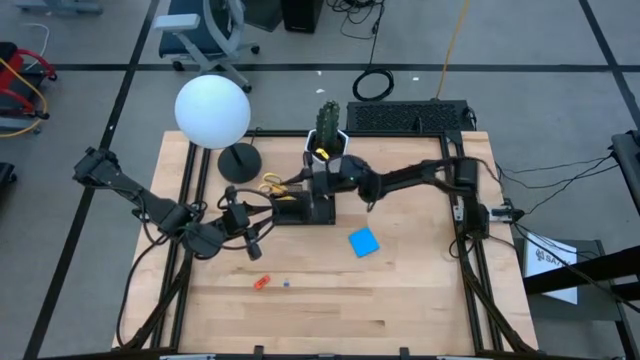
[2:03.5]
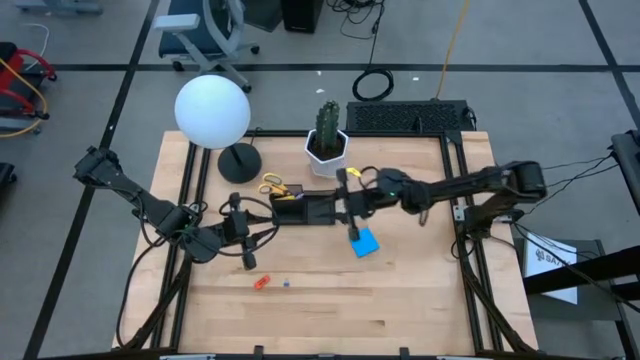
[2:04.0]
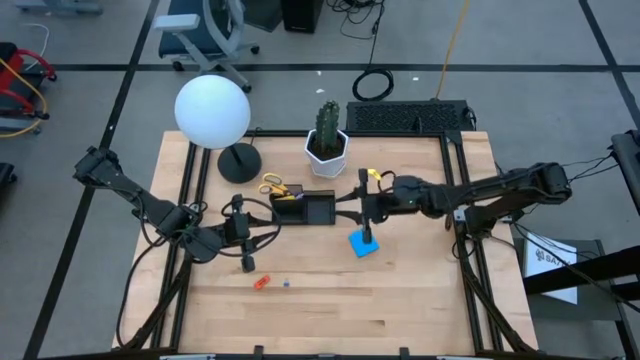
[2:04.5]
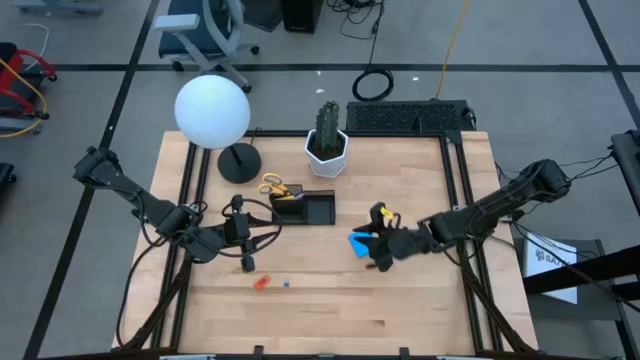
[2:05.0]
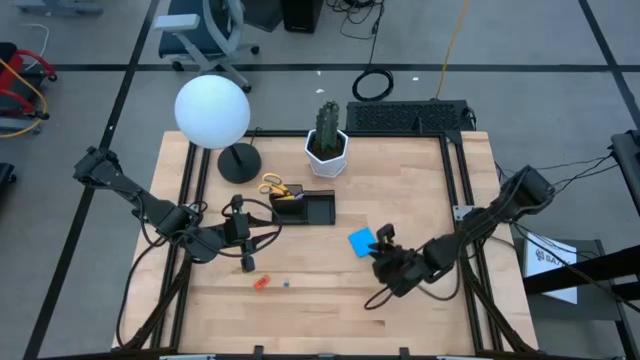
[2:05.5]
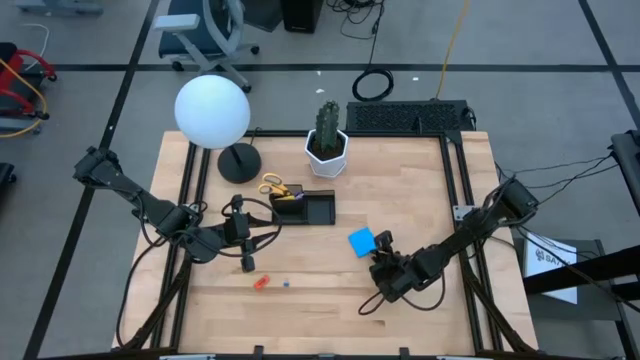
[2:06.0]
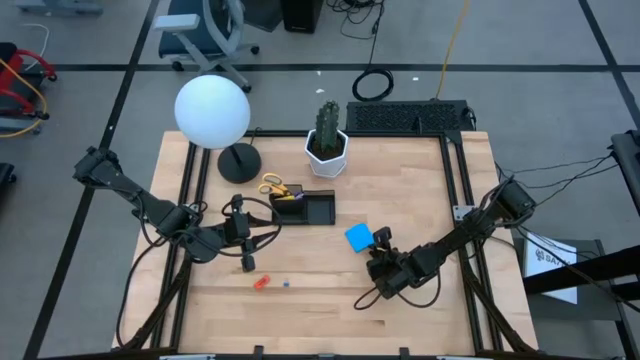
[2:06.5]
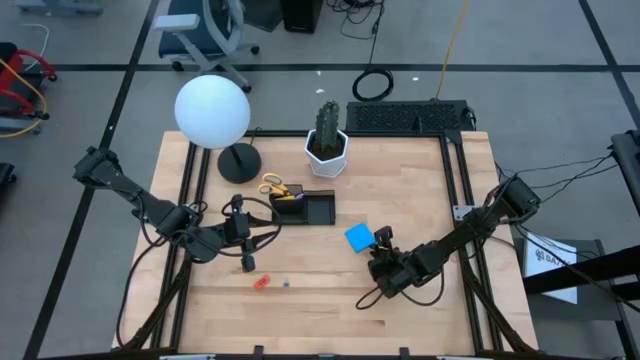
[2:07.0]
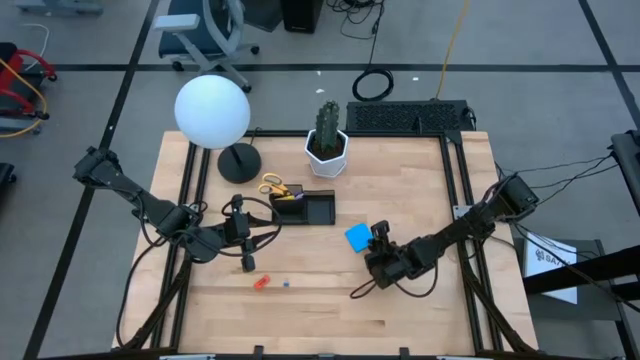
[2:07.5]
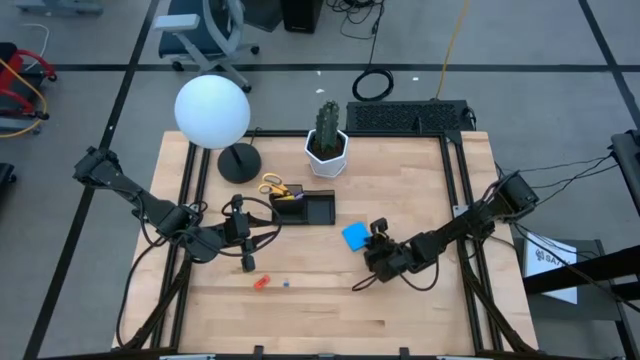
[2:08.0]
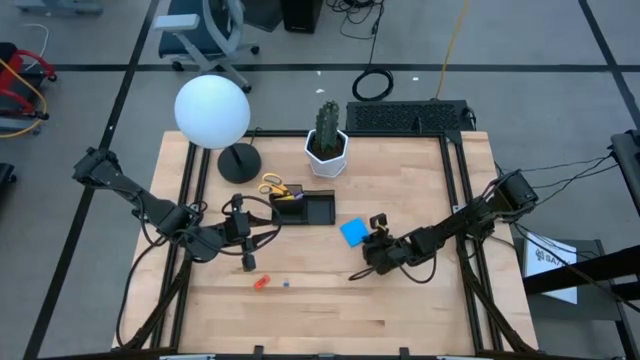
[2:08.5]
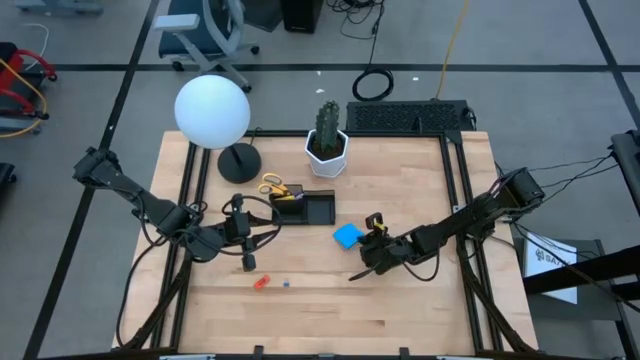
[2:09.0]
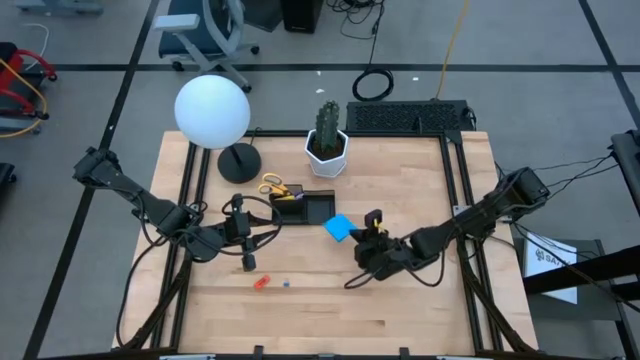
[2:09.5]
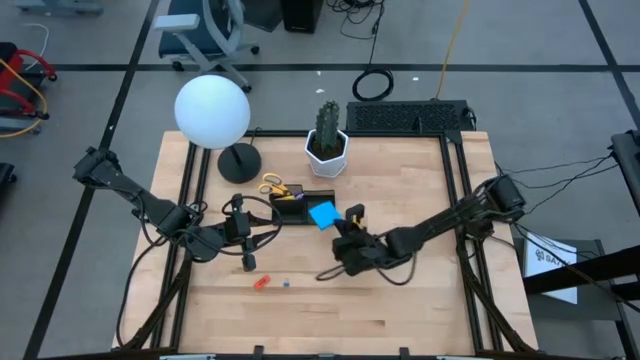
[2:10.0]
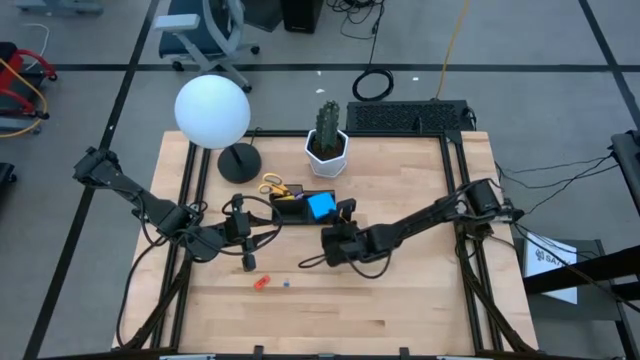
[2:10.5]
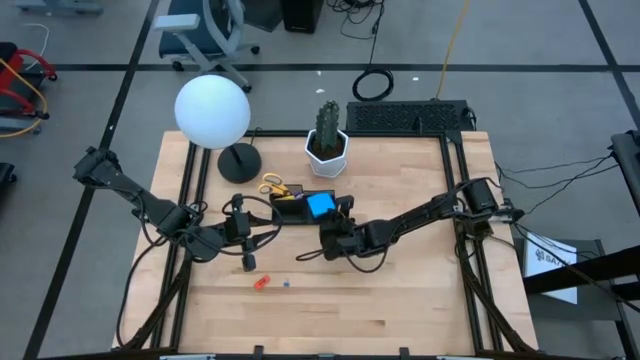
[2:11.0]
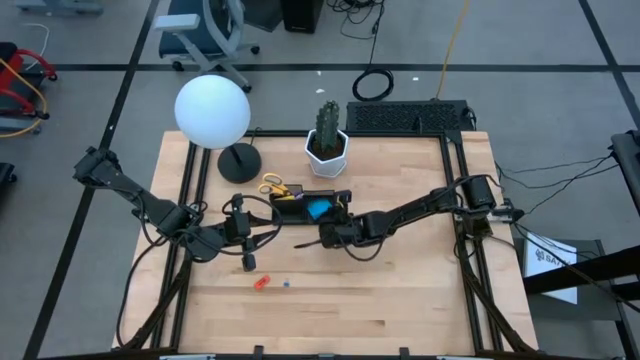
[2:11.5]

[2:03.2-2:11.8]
Task: Pick and place office supplies into organizer
Put the note pads into the desk organizer

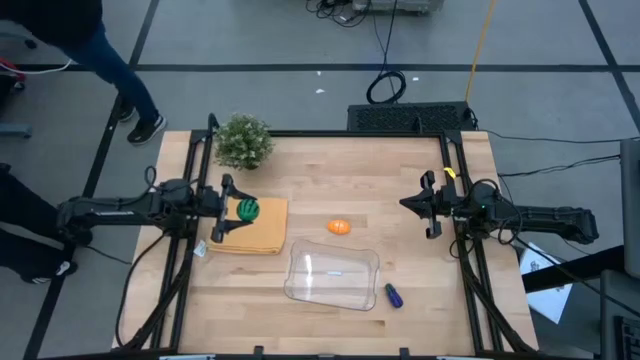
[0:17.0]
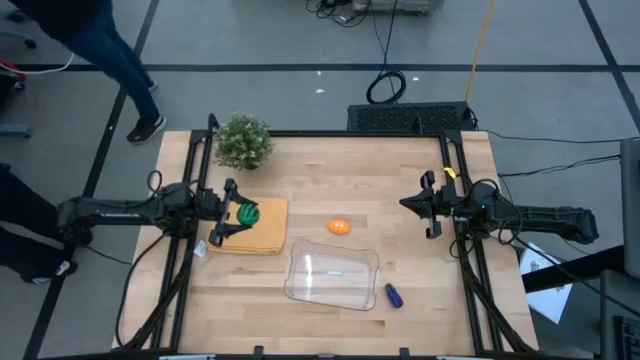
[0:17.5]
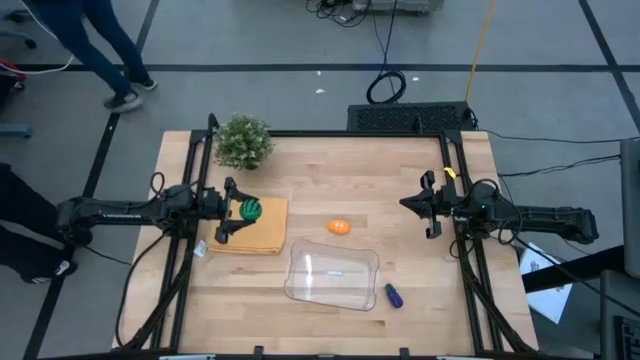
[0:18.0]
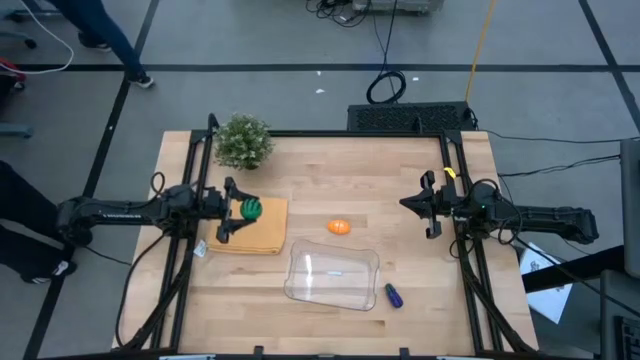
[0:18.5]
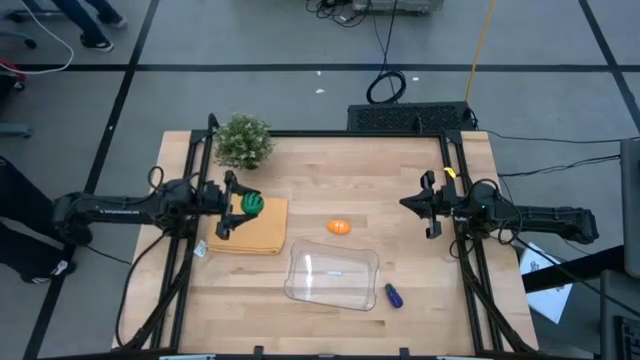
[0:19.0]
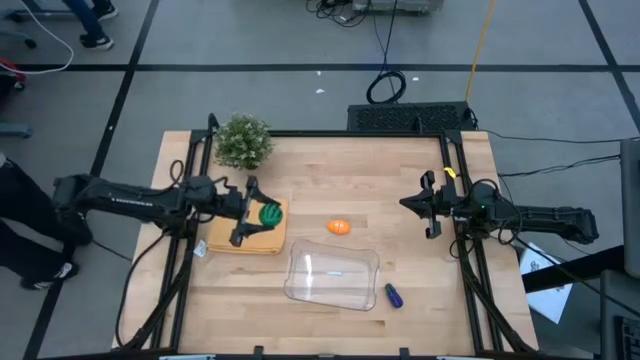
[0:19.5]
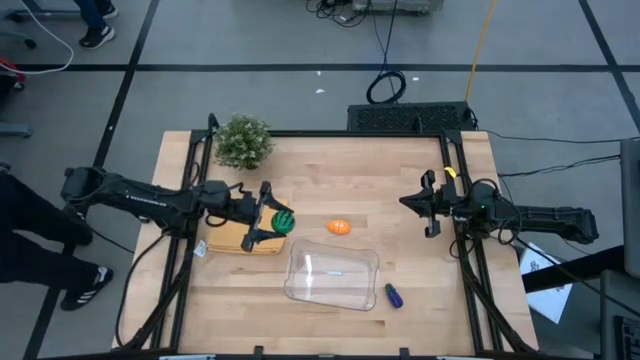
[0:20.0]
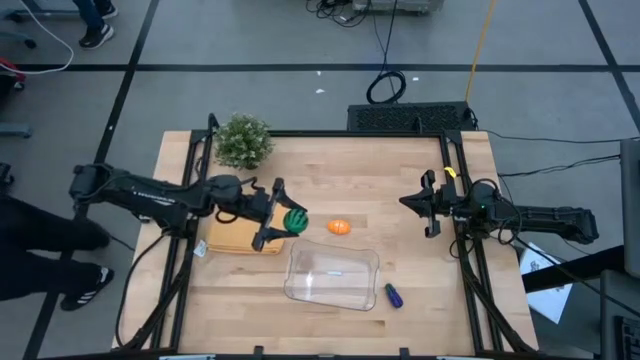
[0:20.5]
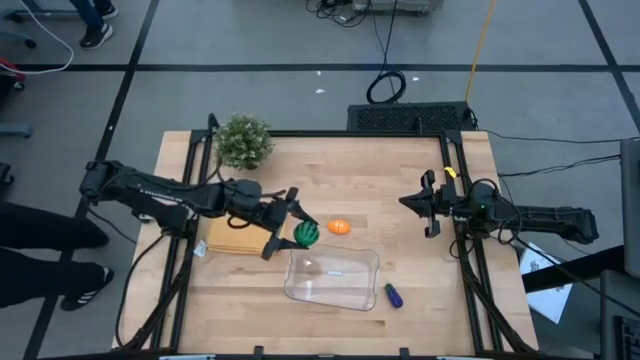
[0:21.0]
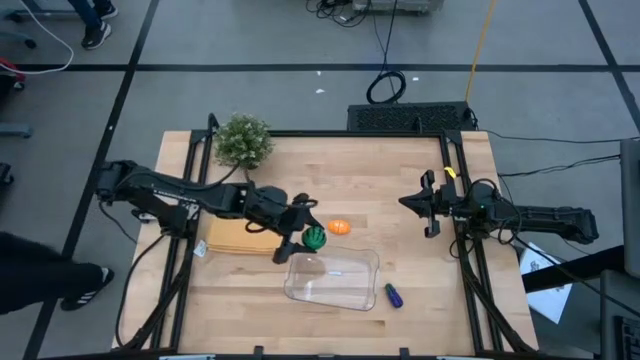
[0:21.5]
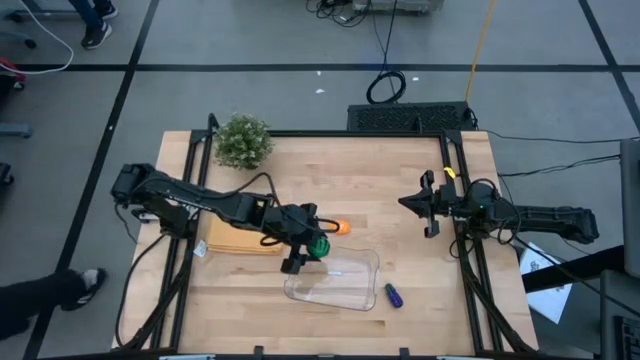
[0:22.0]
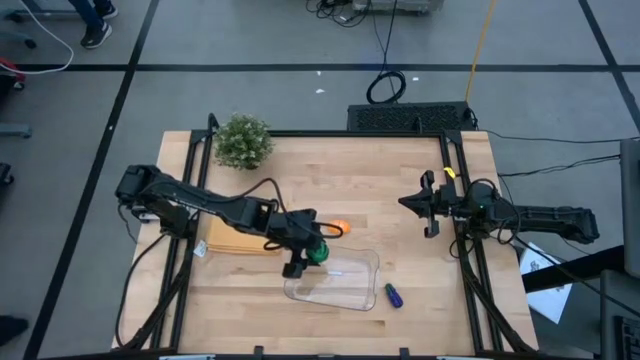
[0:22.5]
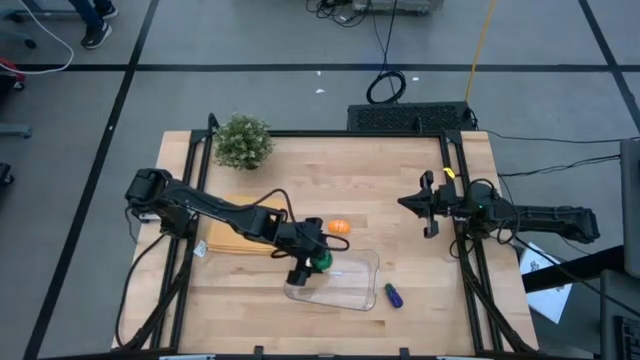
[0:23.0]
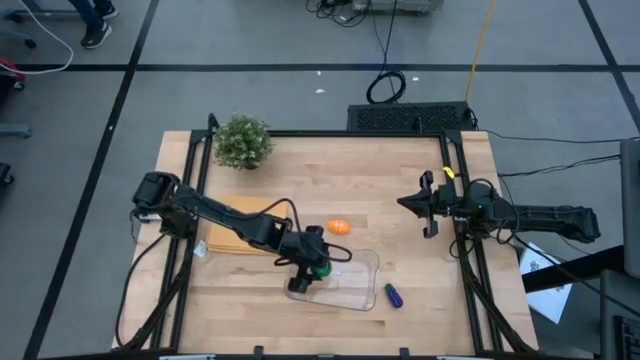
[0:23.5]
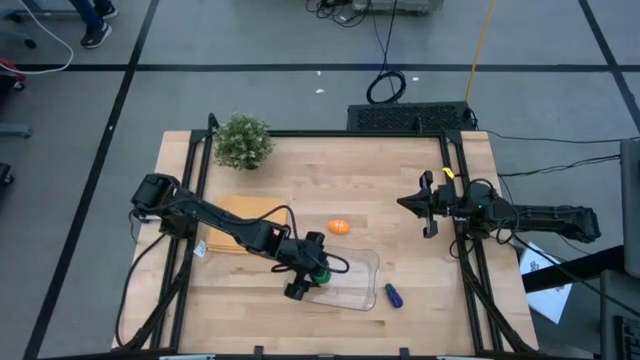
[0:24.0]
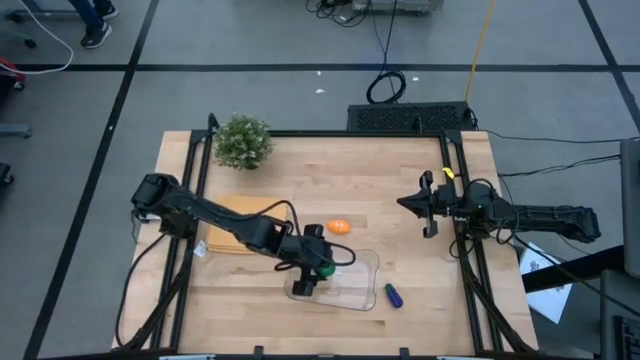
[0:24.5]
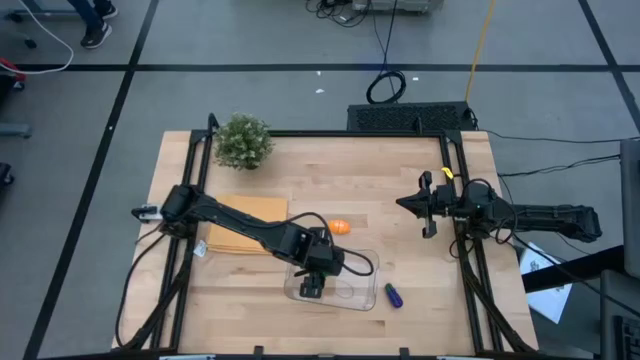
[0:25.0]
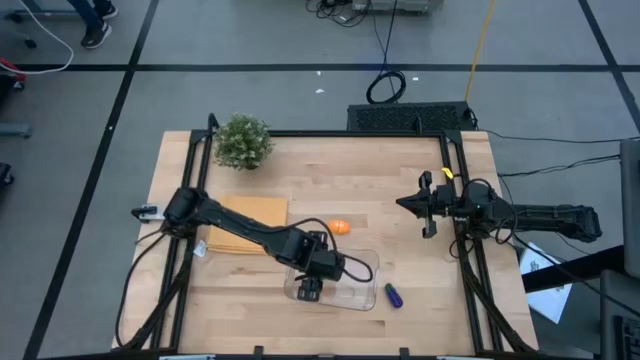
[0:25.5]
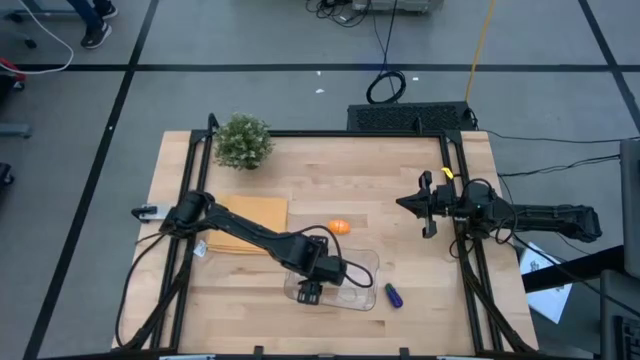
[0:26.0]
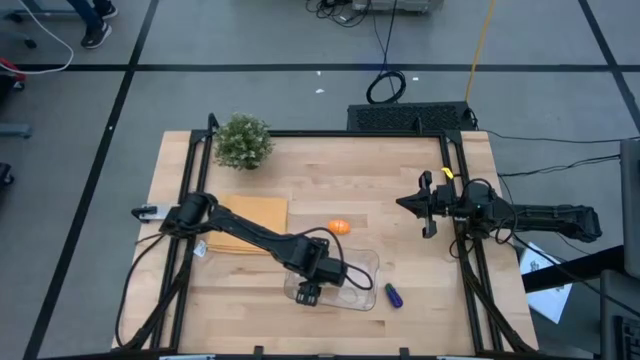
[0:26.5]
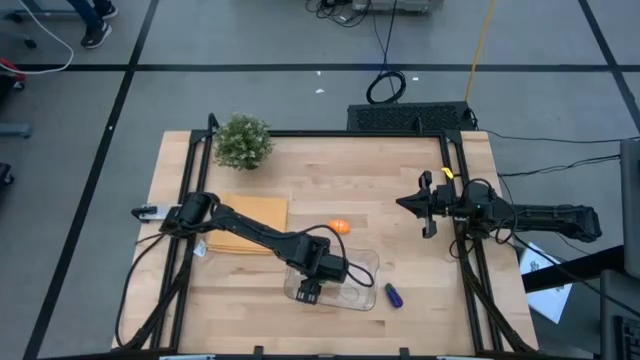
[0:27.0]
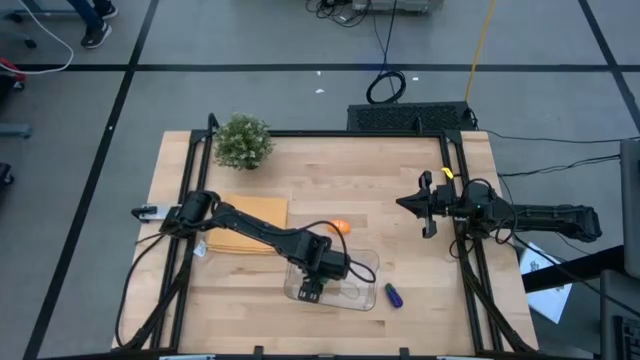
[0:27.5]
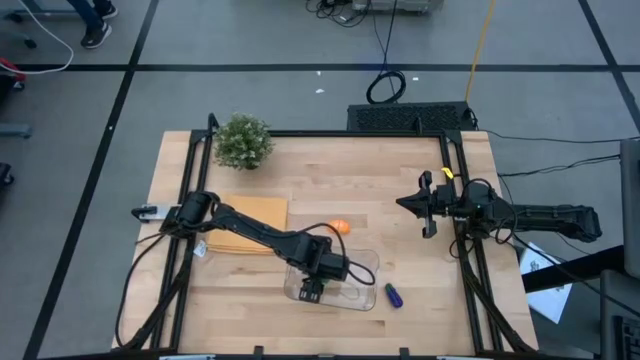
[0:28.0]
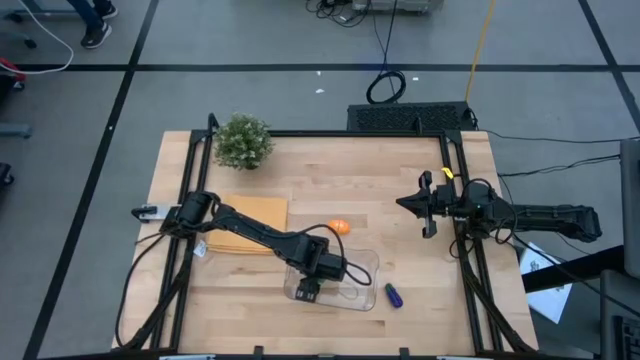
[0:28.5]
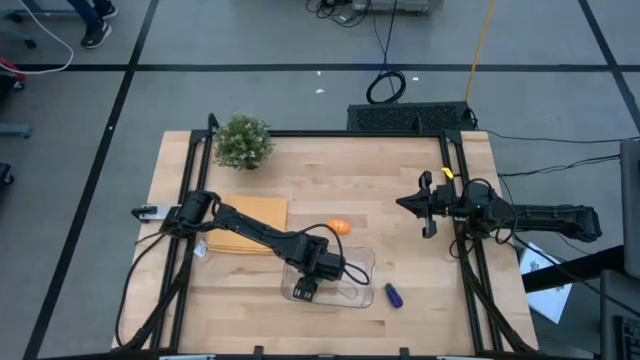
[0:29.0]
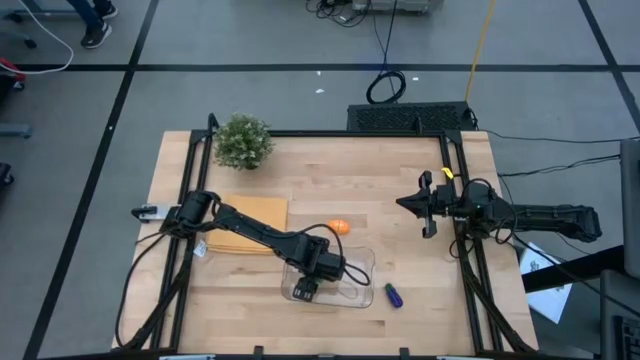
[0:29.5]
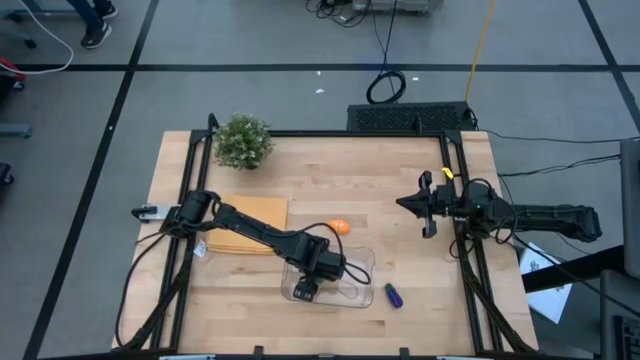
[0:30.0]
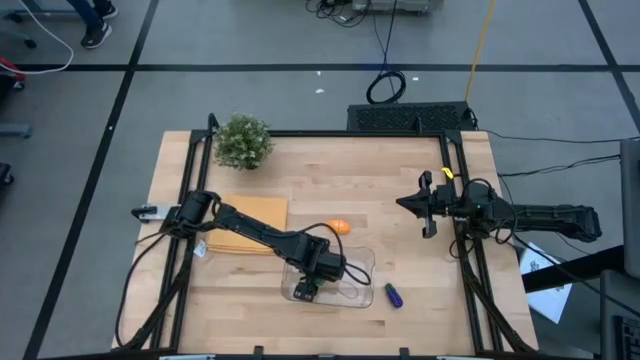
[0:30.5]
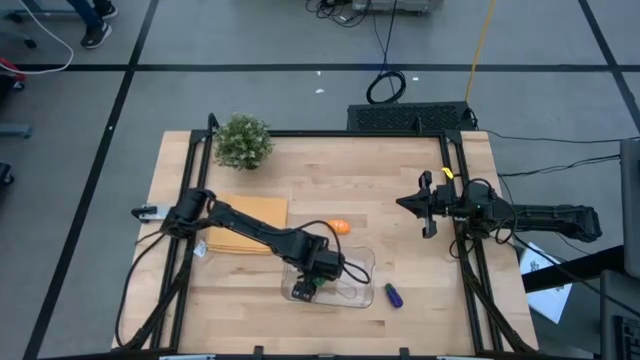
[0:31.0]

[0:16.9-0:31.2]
Task: Pick and placing Produce into tupperware
Put the green watermelon into the transparent bin
